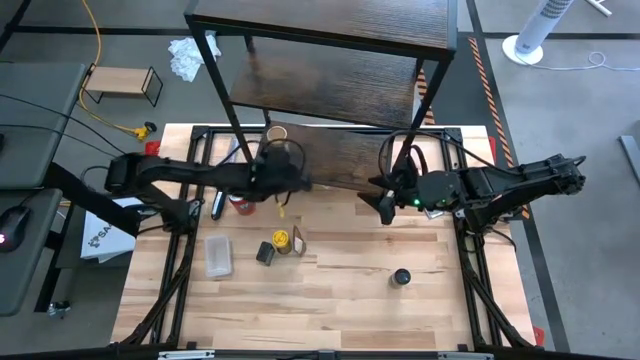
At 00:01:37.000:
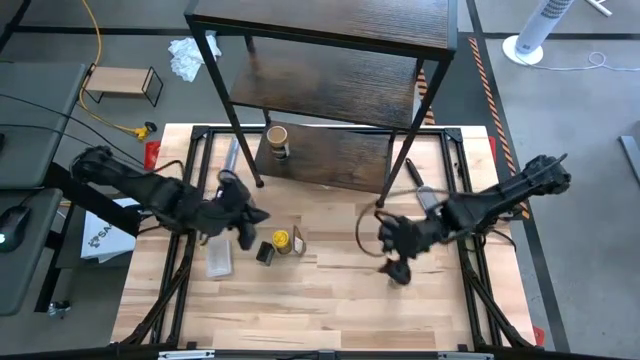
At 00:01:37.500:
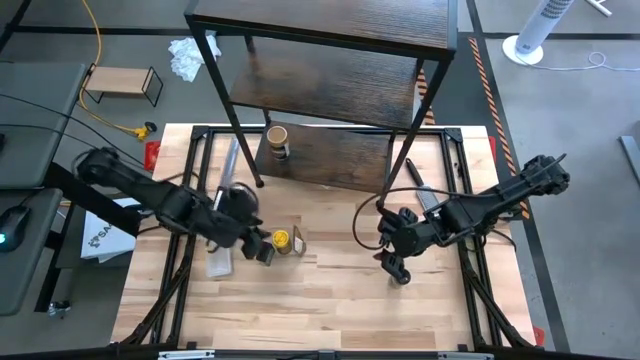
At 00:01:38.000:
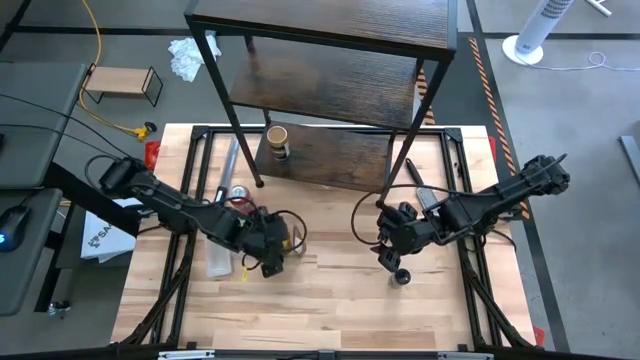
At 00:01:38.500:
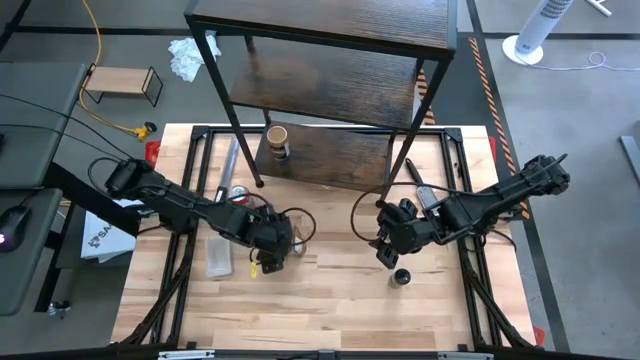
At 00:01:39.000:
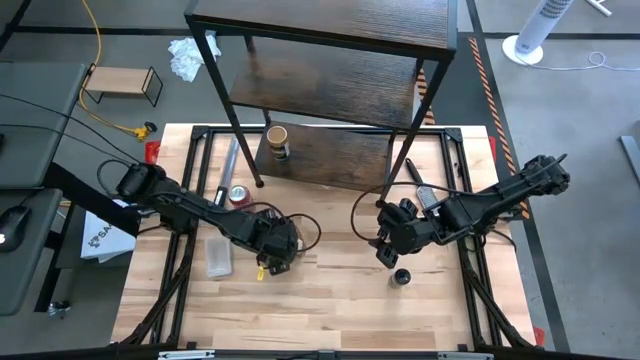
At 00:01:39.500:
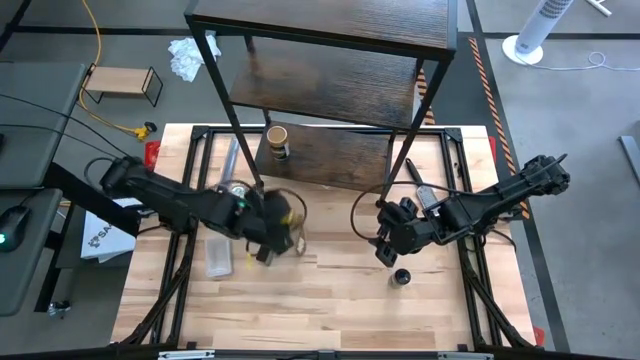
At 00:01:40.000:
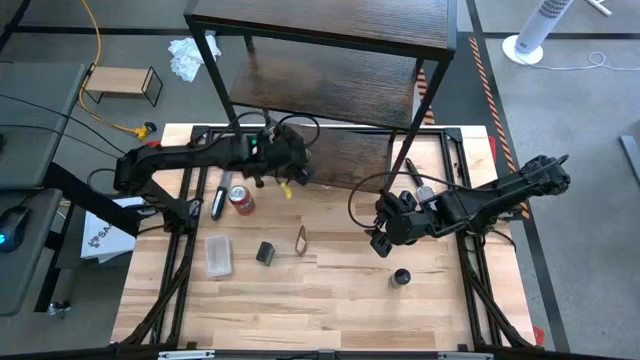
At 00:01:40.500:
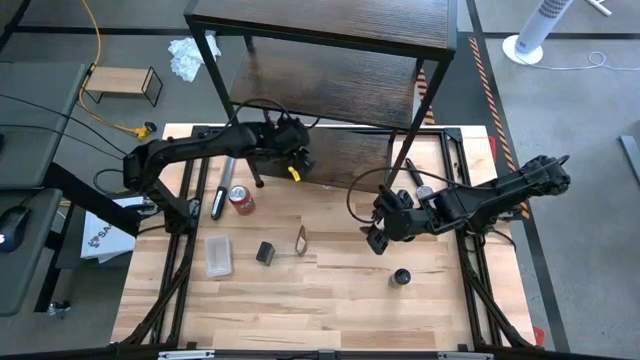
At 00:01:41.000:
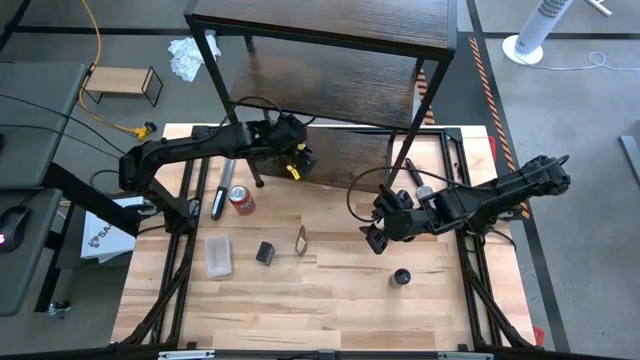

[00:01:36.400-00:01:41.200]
Task: Shelf spices
Put the yellow seasoning bottle on the bottom shelf aligned with the brown seasoning bottle

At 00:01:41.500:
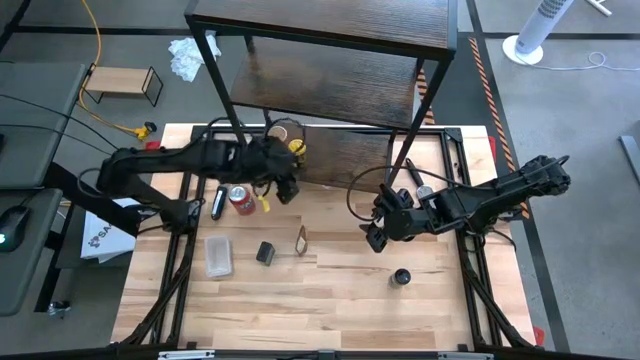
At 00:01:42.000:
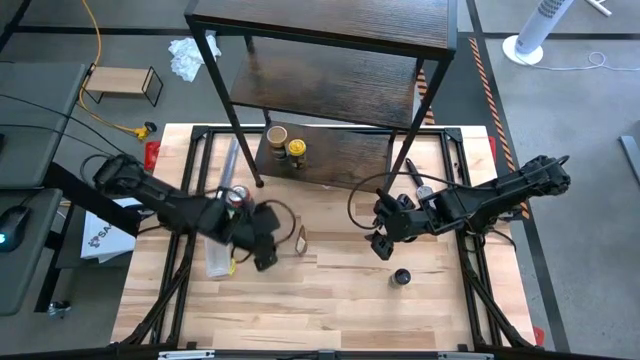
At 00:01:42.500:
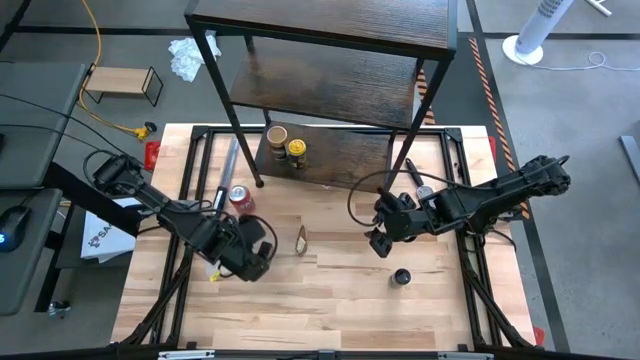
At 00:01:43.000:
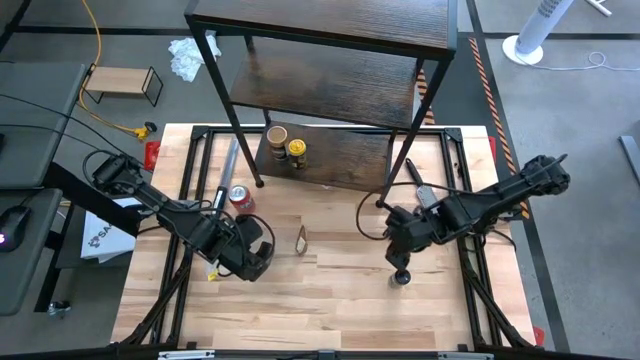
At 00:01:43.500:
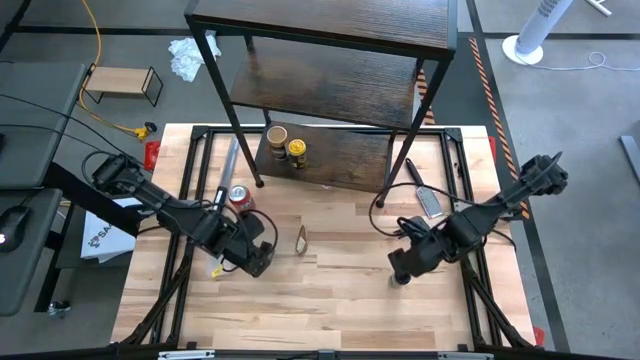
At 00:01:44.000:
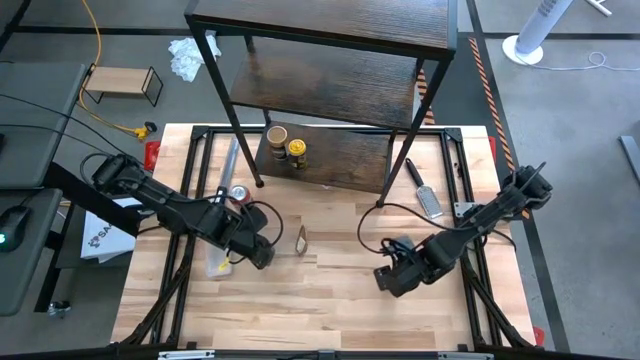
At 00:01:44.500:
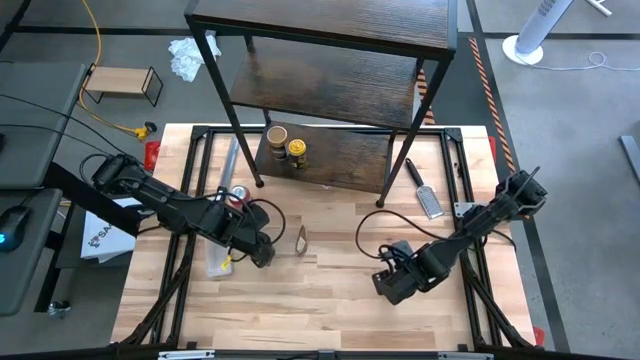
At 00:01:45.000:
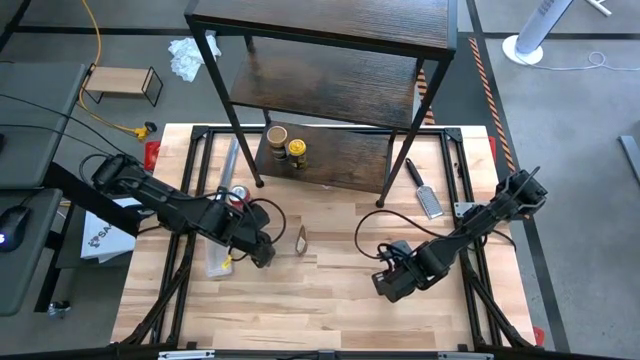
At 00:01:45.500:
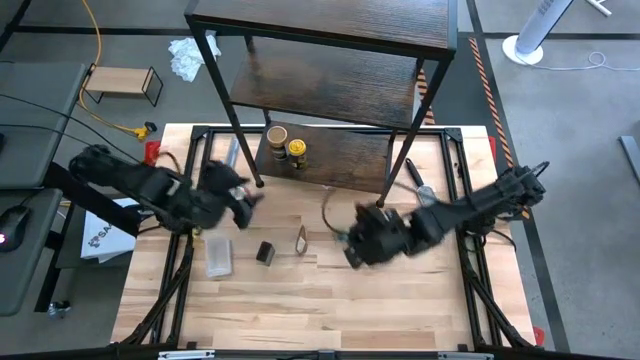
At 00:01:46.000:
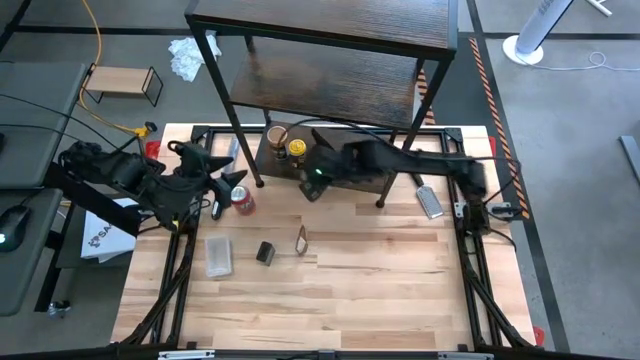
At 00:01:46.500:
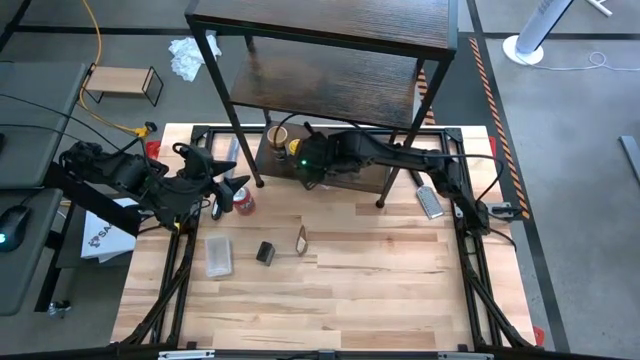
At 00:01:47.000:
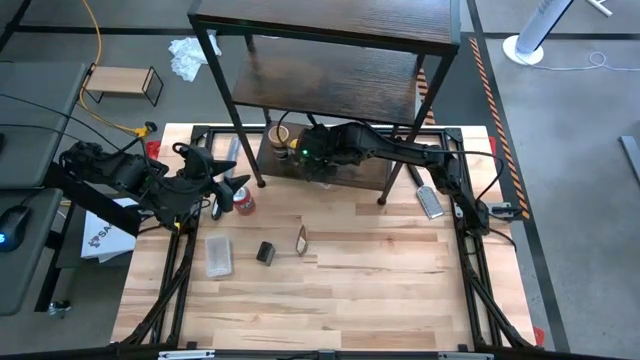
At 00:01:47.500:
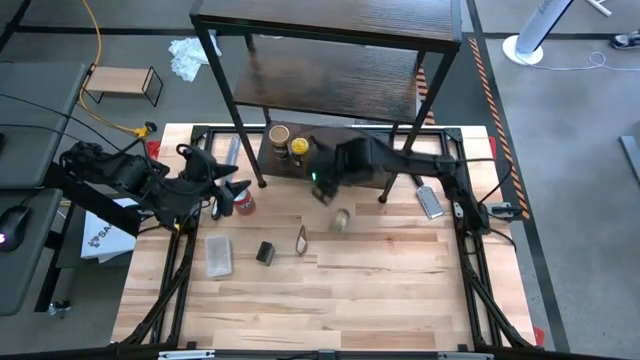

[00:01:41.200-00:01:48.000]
Put the black seasoning bottle on the bottom shelf aligned with the yellow seasoning bottle

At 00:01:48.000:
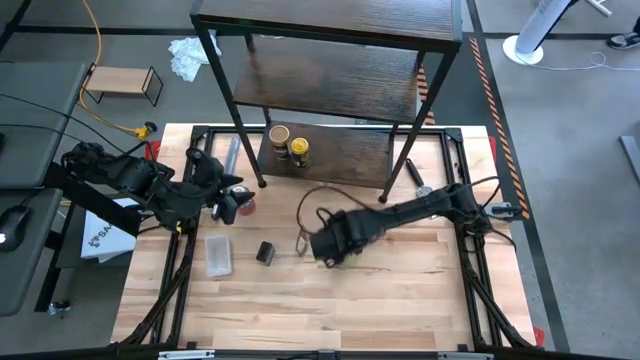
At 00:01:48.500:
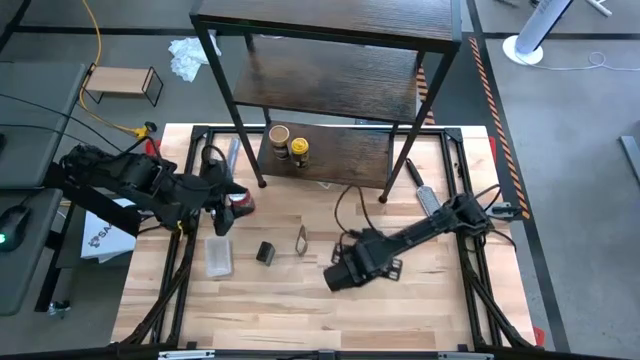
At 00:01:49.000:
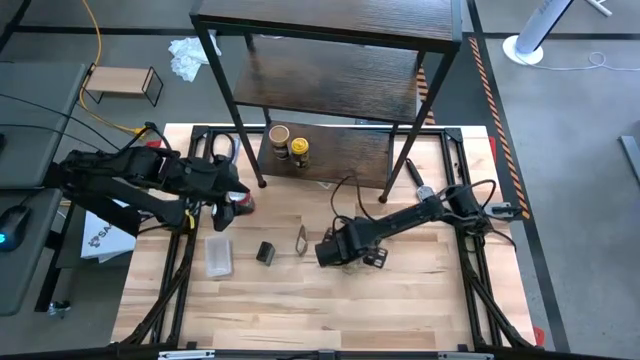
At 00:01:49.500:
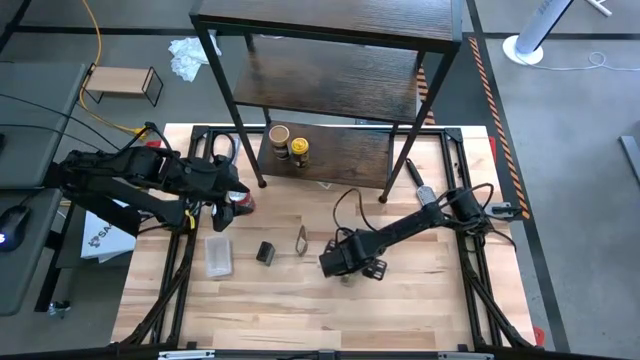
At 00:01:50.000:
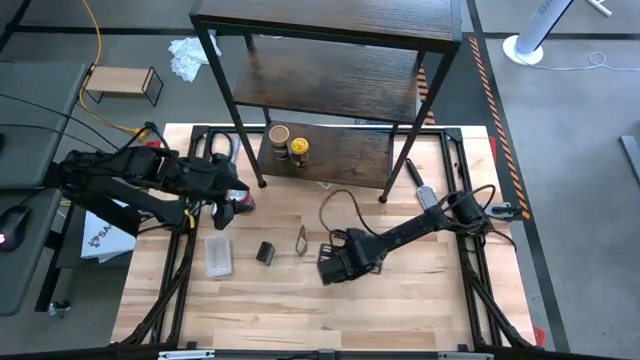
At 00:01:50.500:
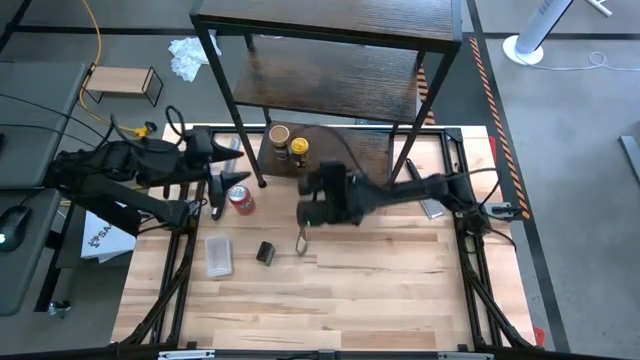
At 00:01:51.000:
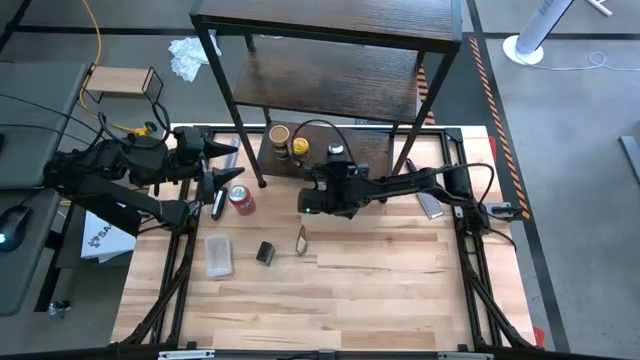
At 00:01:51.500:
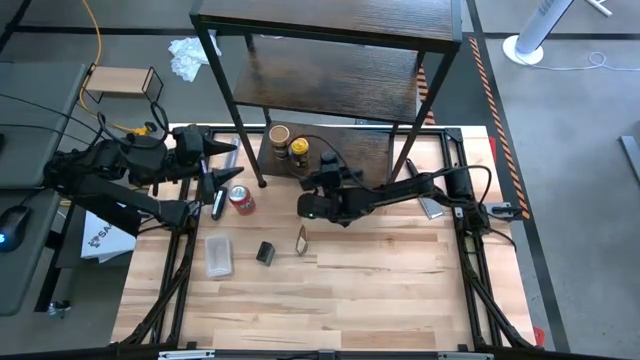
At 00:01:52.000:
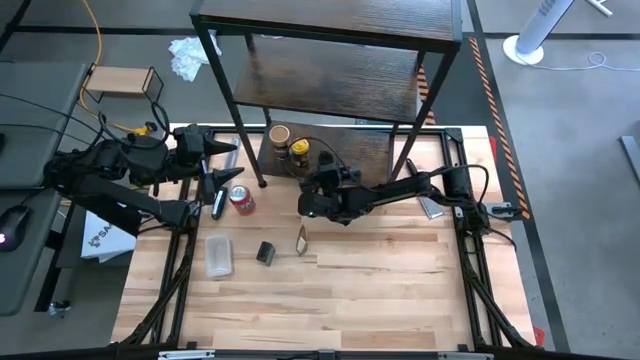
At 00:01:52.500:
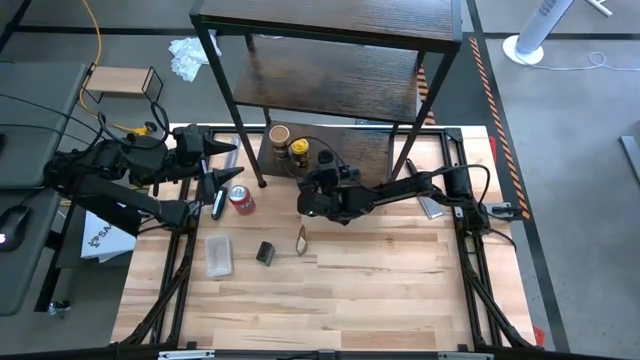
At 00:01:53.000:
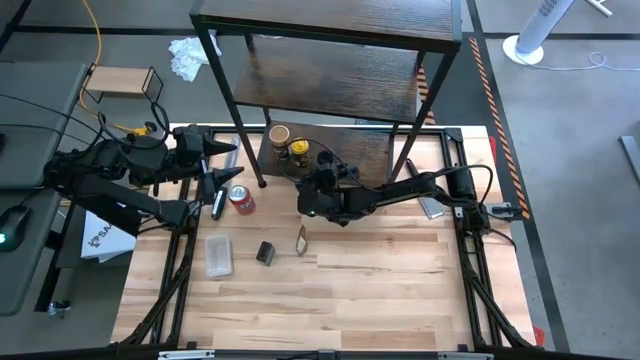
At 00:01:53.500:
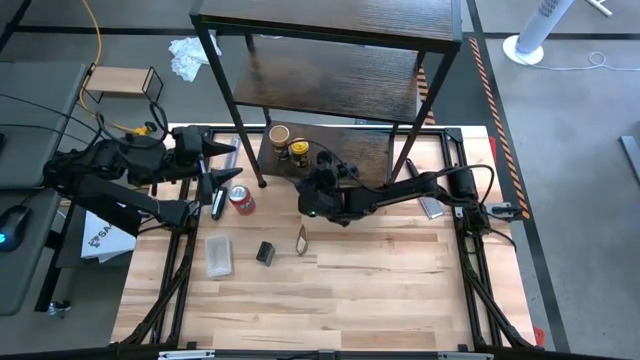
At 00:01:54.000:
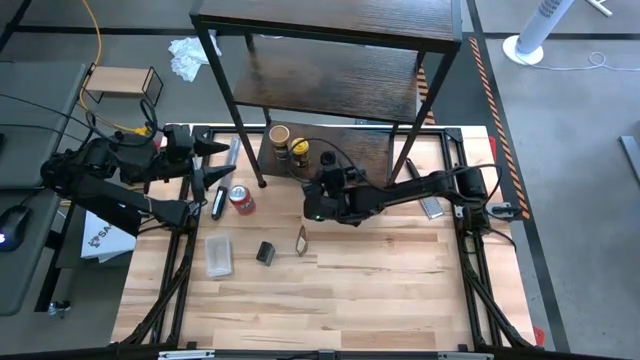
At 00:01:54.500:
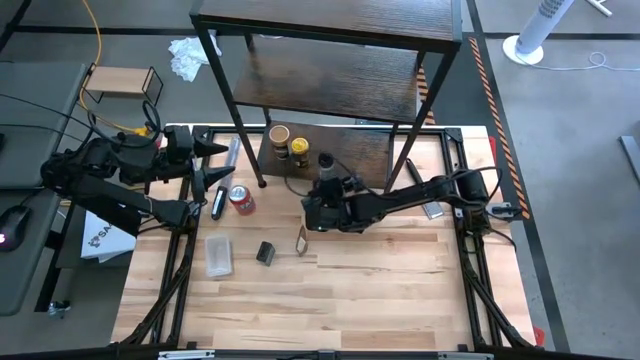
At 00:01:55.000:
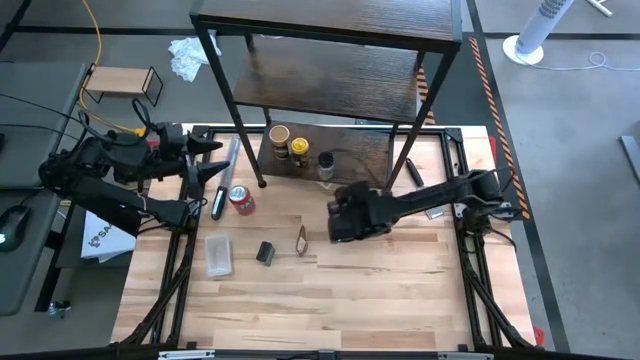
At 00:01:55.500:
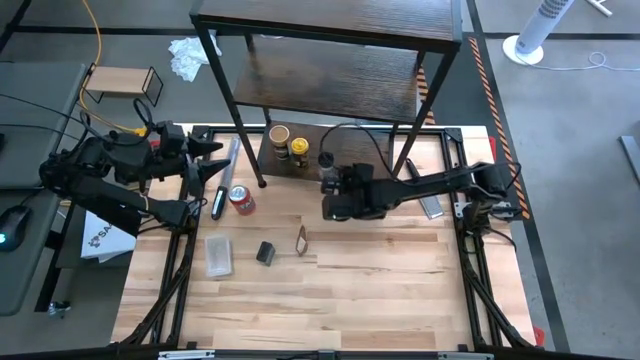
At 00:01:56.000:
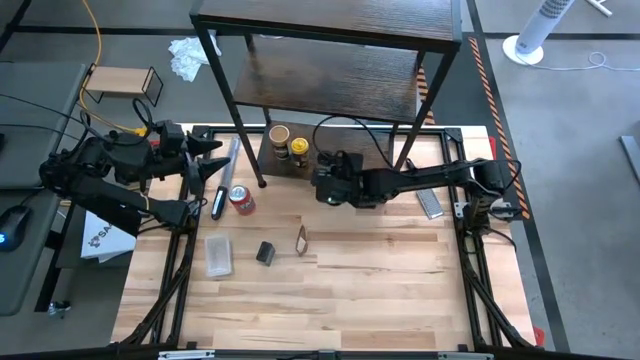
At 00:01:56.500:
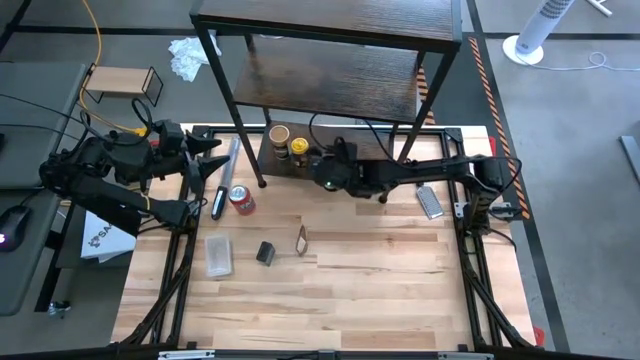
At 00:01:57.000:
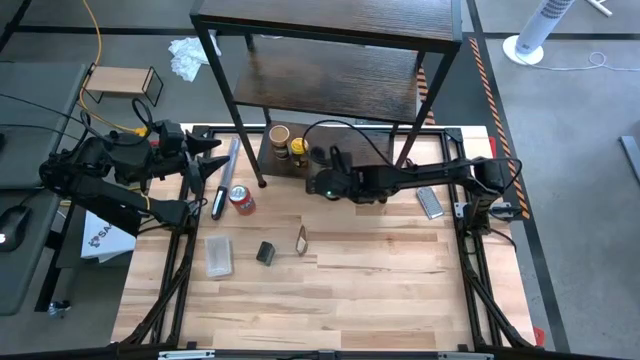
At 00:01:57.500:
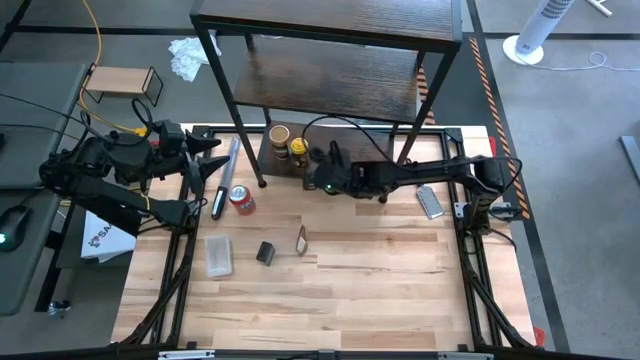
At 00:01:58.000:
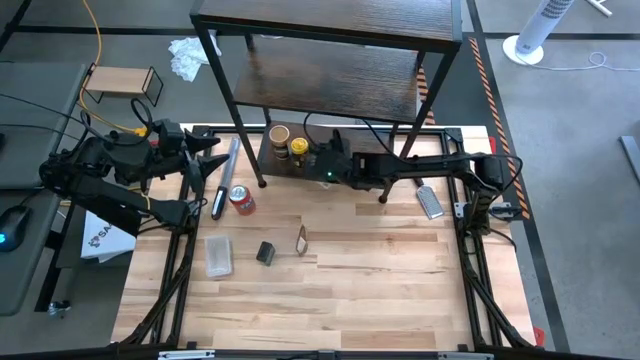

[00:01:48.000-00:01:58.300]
Put the black seasoning bottle on the bottom shelf aligned with the yellow seasoning bottle
